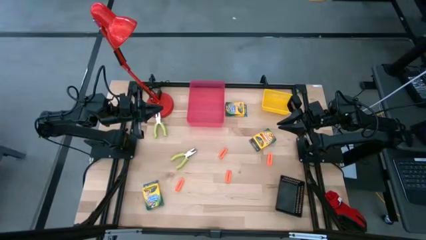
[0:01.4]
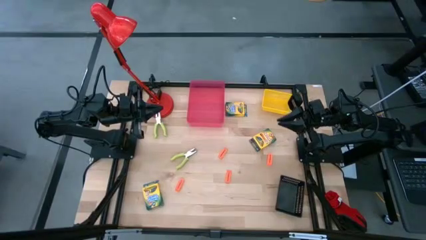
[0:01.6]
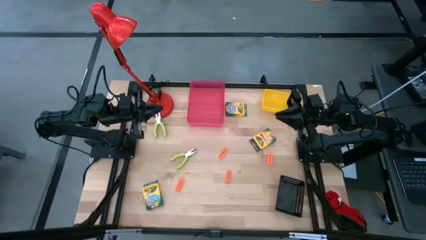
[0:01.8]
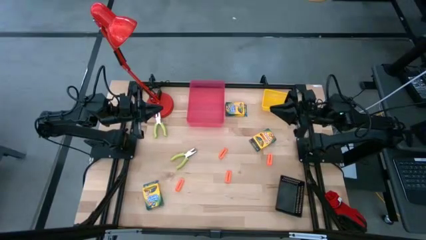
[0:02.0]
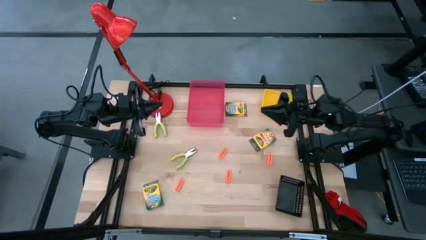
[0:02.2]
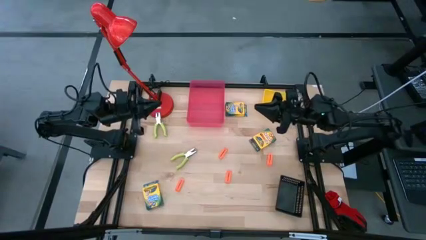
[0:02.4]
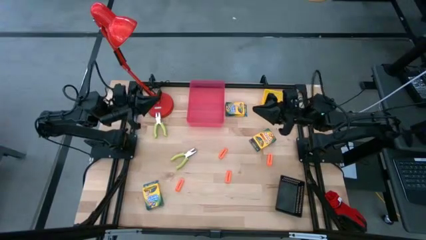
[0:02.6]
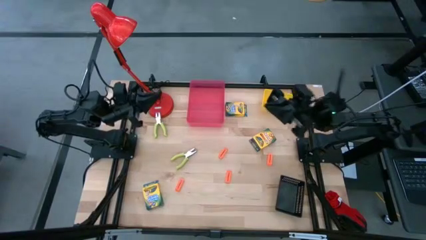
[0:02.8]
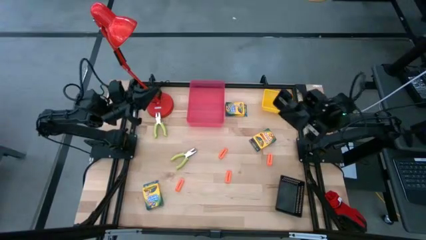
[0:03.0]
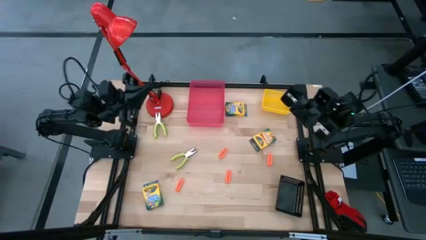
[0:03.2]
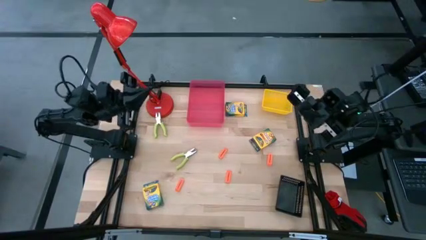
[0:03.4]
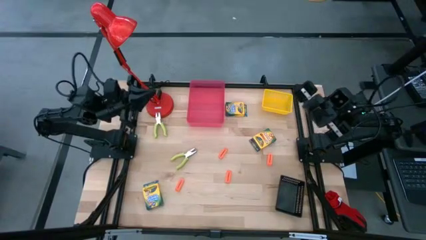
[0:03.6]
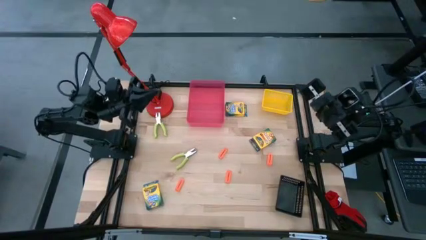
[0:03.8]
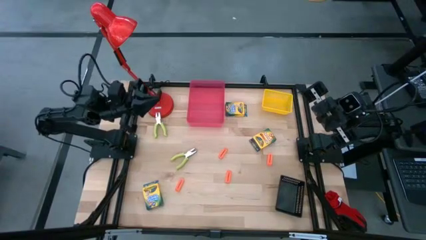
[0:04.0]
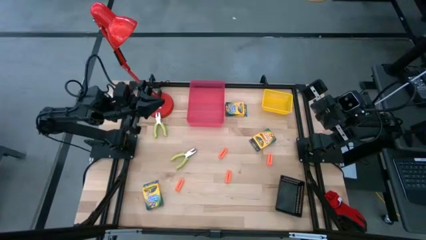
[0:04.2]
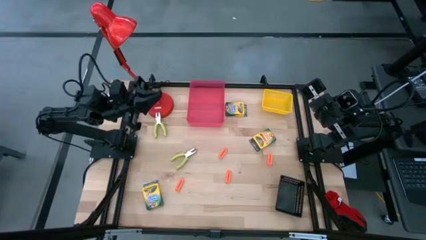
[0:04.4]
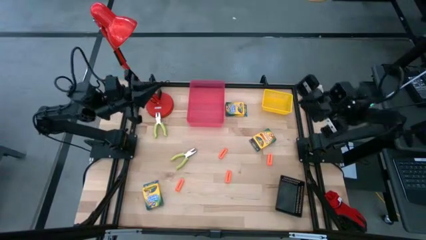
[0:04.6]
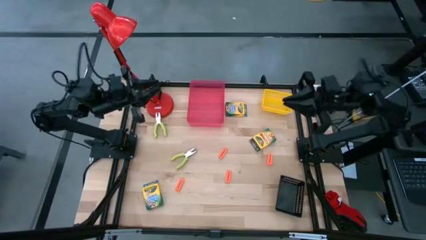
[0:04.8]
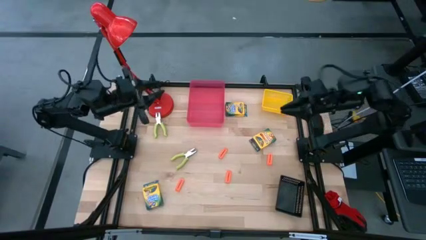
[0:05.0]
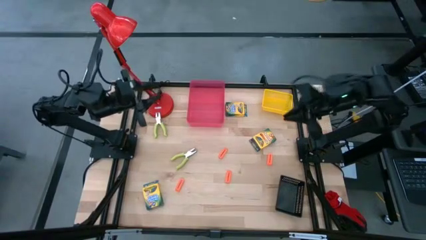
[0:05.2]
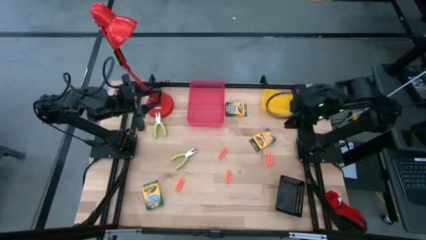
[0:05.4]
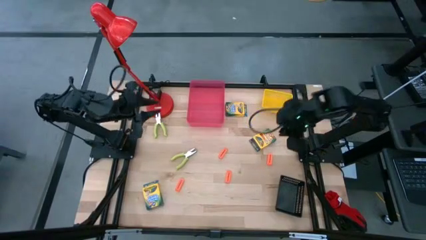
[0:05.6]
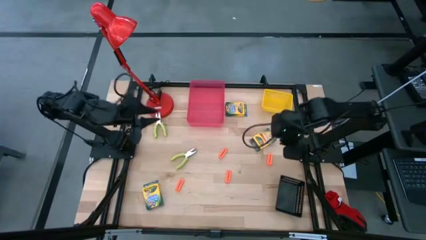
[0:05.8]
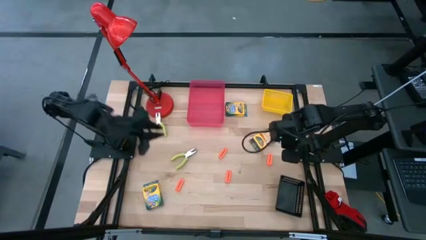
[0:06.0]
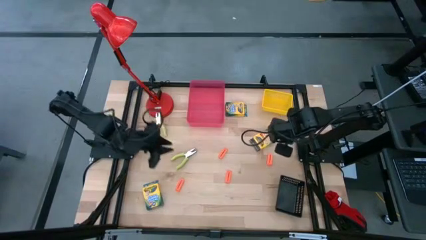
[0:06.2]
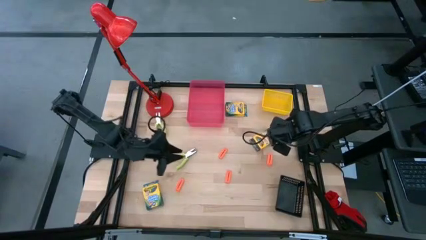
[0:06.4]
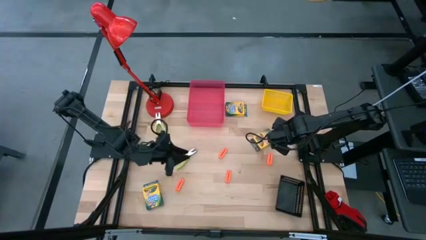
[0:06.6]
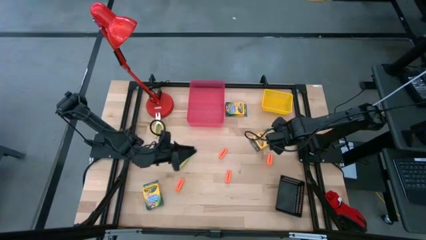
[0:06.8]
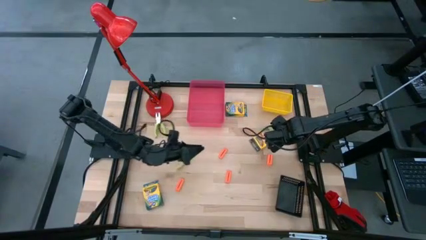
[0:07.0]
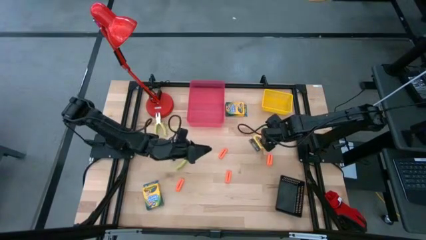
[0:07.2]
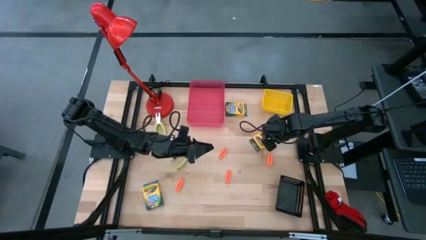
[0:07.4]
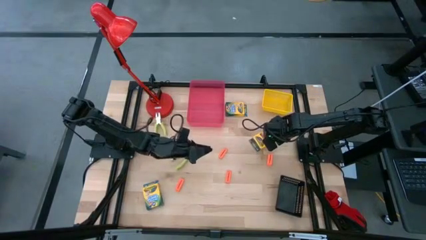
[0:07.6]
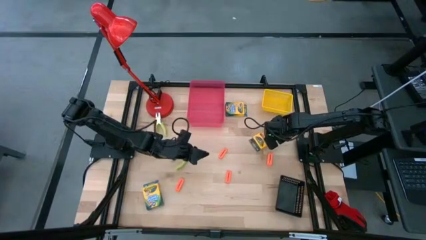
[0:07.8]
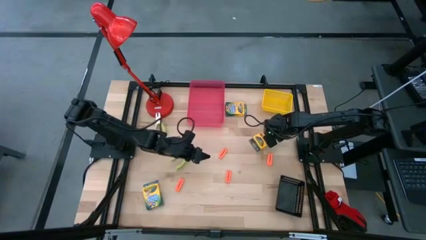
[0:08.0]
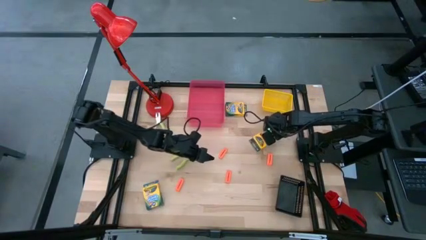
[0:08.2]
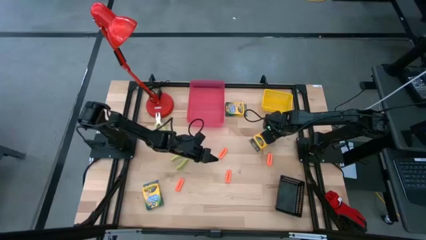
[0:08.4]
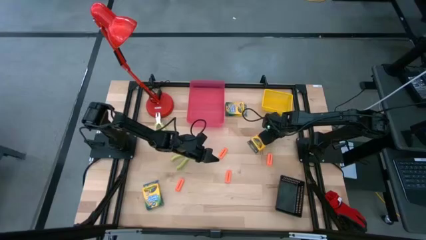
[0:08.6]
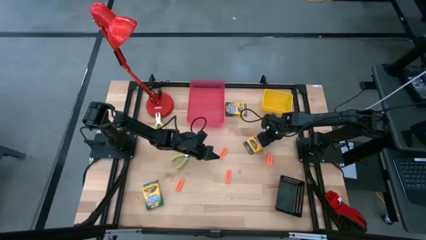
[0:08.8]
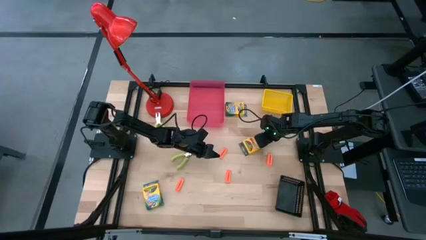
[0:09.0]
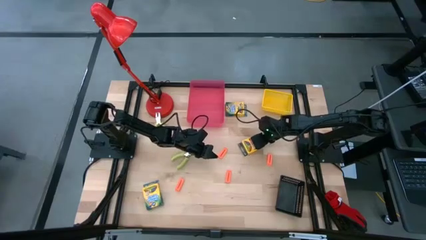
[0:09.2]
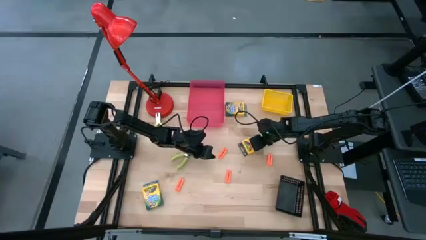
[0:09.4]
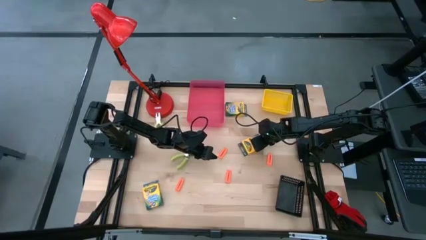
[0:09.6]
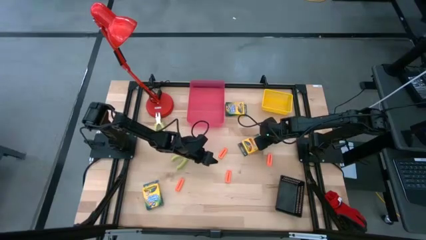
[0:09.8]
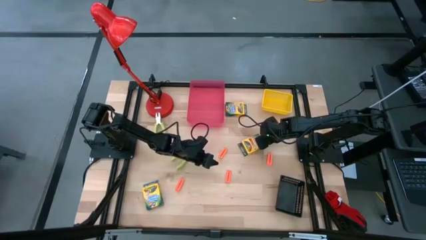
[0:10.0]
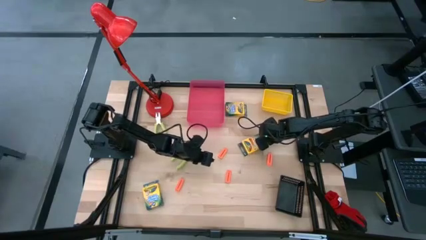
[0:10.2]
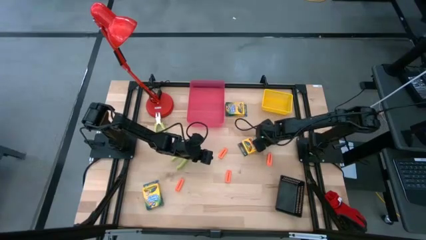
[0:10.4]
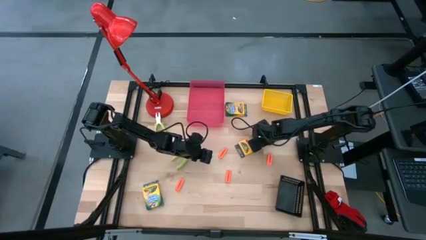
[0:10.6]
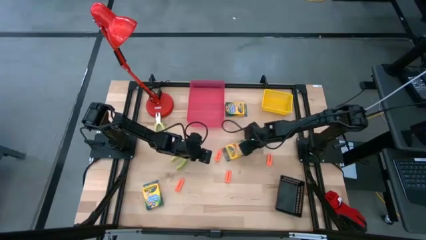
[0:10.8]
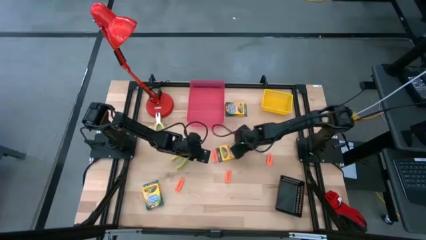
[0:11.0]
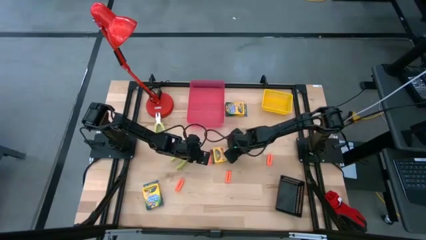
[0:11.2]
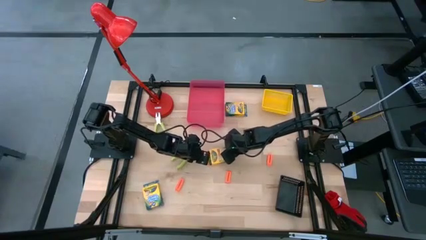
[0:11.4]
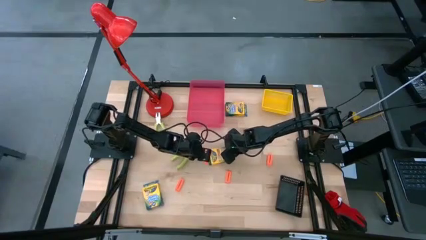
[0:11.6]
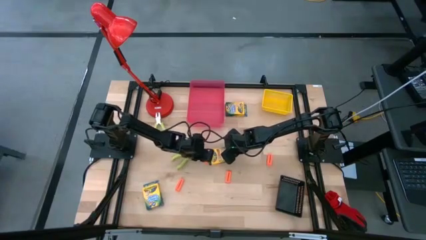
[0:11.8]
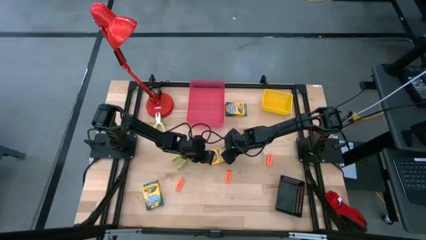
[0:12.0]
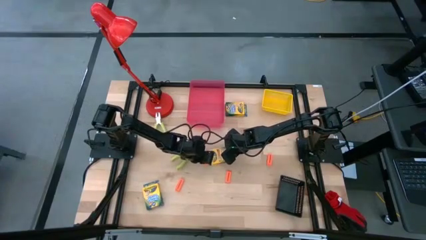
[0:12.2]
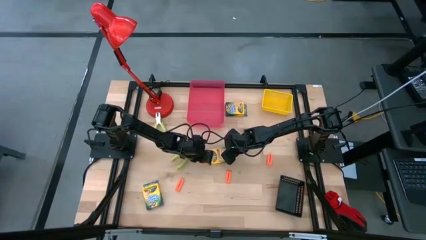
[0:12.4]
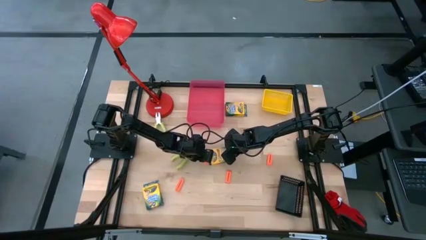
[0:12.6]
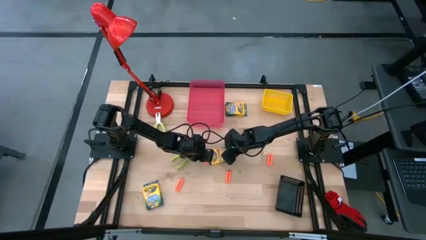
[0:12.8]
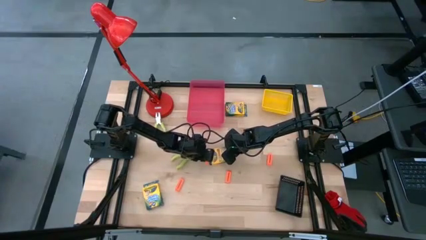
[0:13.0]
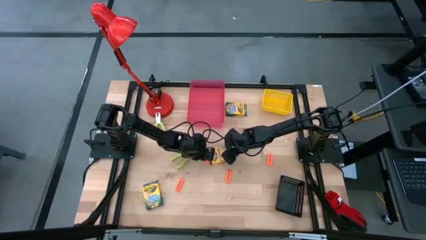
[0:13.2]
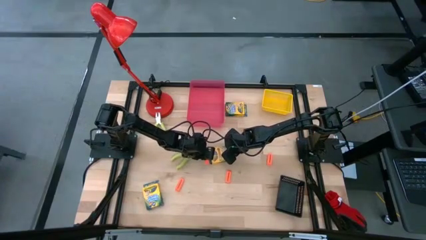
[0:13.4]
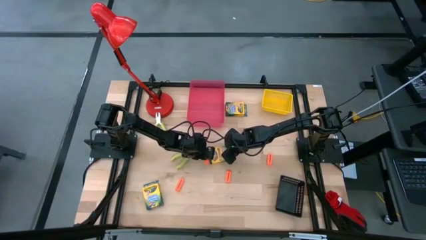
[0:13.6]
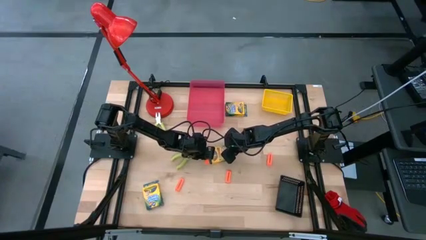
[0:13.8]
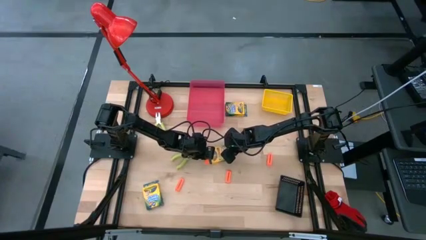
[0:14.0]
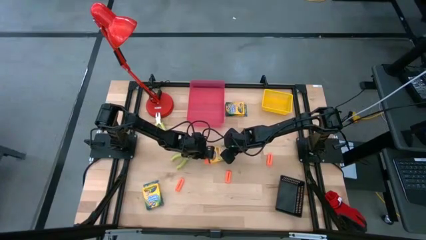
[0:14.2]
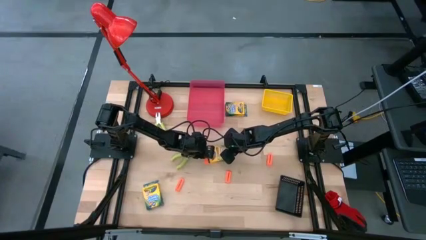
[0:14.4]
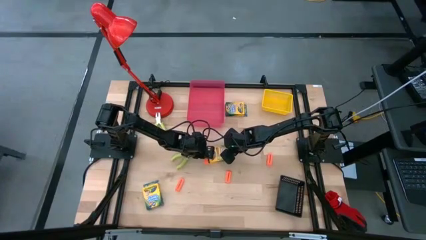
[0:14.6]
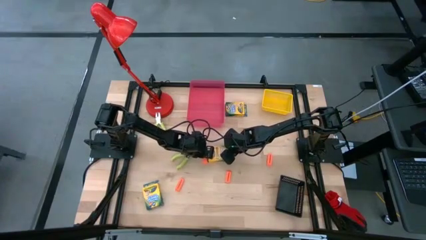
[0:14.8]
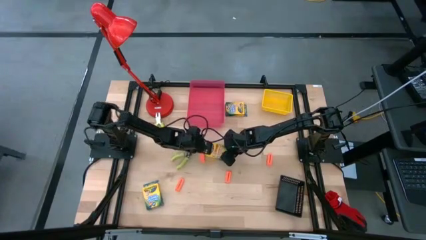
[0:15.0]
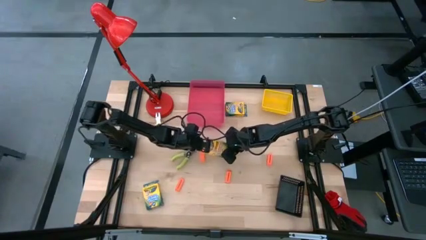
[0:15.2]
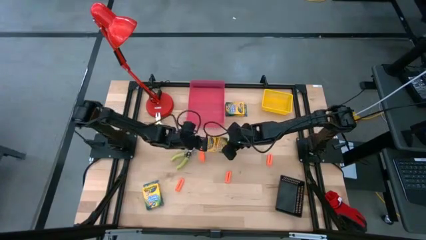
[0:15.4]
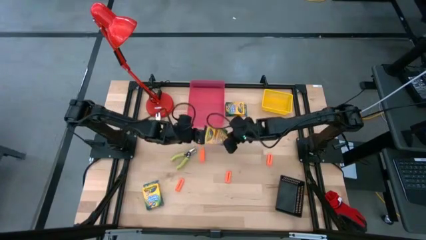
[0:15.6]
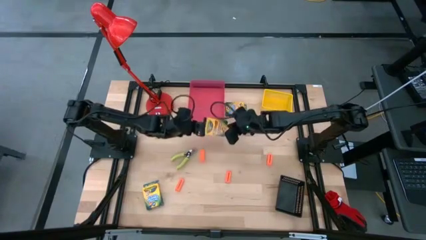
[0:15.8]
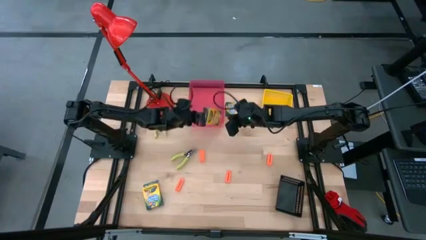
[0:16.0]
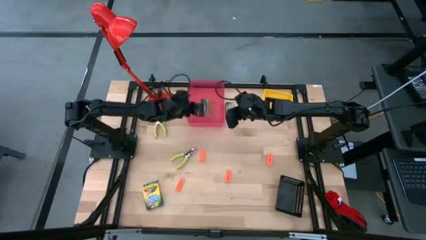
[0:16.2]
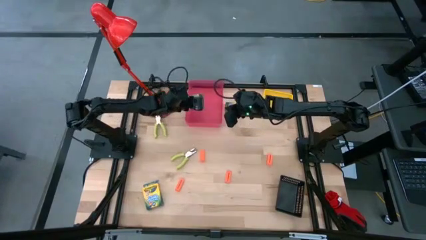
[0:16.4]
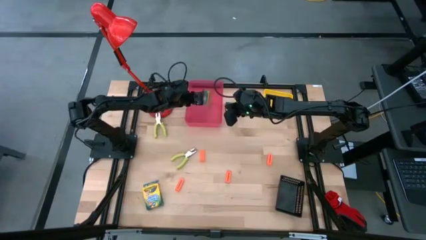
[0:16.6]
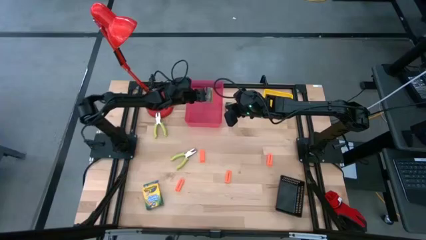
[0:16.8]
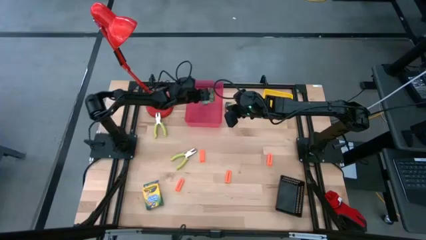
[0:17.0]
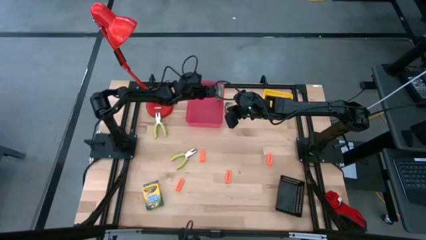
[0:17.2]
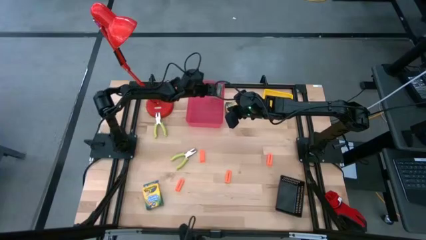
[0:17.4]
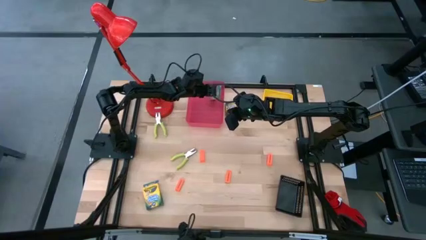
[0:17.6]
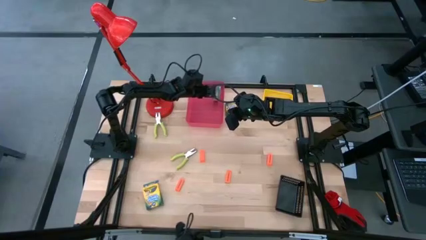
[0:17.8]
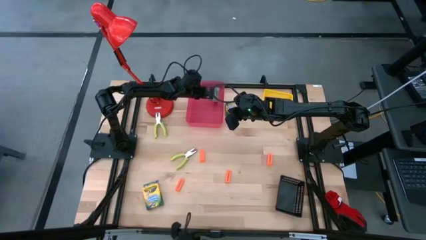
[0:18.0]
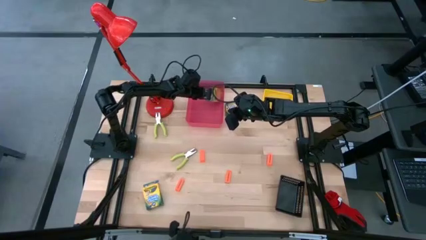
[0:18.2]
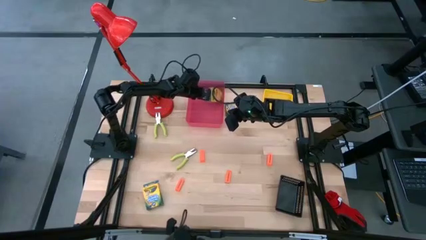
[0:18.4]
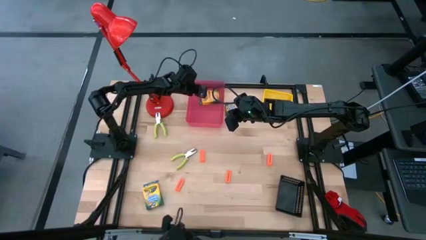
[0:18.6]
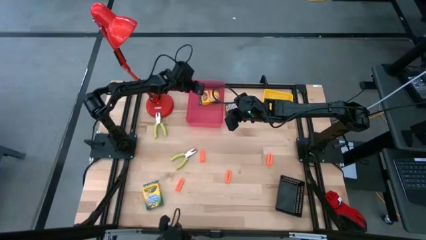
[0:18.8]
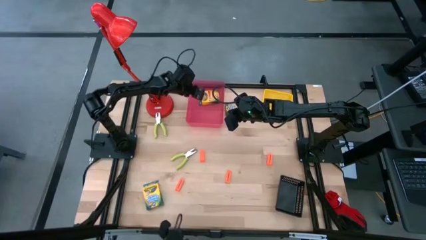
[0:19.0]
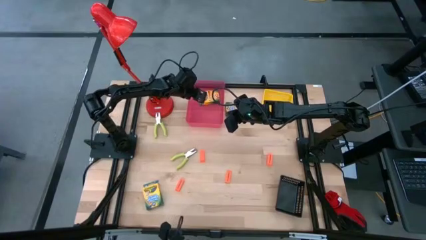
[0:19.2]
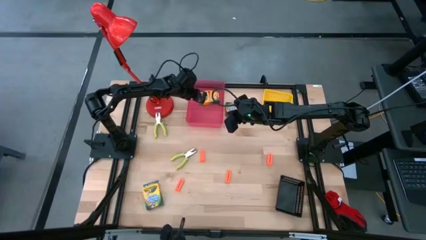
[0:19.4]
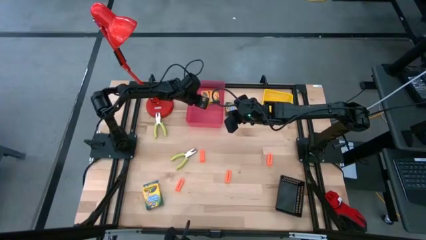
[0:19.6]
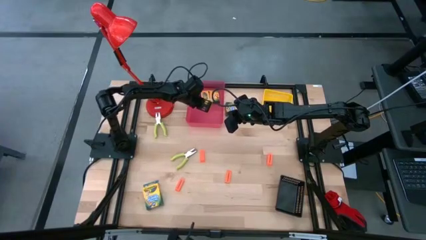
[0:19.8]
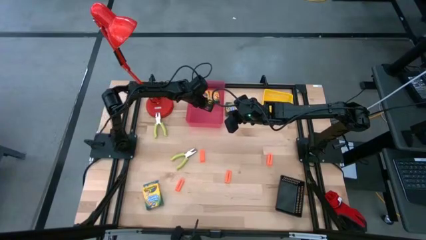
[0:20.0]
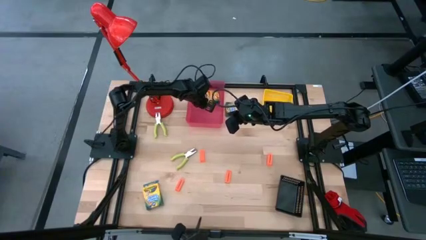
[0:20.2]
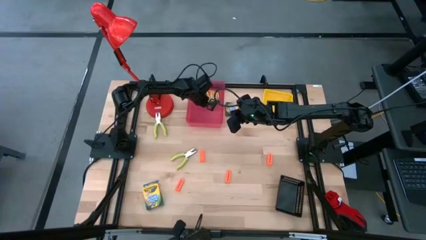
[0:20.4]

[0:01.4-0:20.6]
Task: Pick & Place School Supplies
Put the yellow crayon box into the red bin
